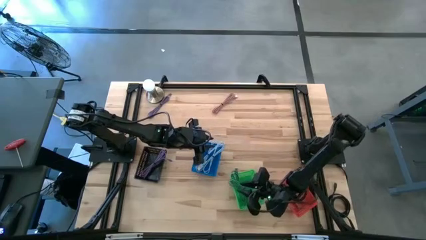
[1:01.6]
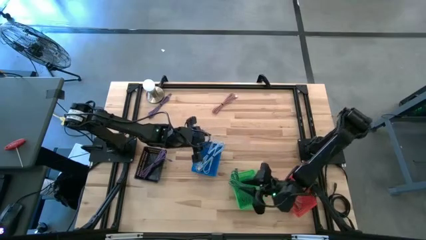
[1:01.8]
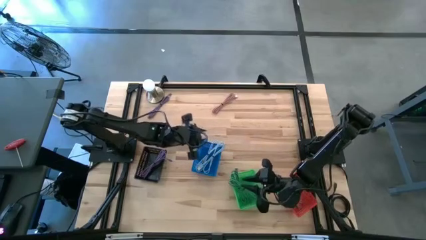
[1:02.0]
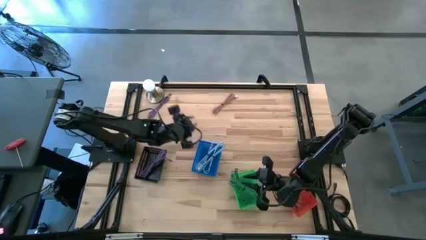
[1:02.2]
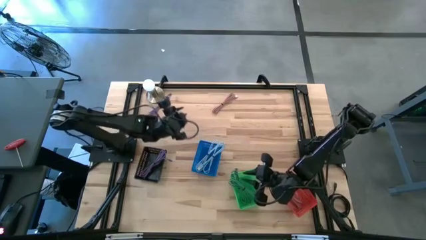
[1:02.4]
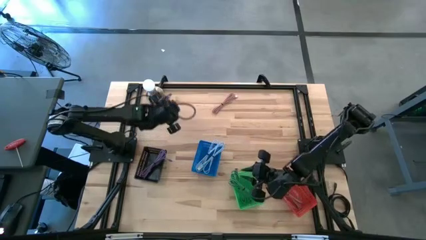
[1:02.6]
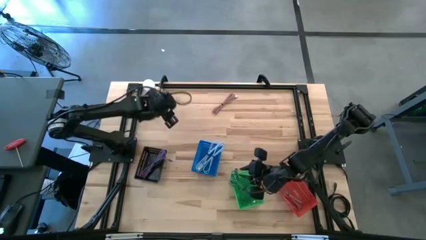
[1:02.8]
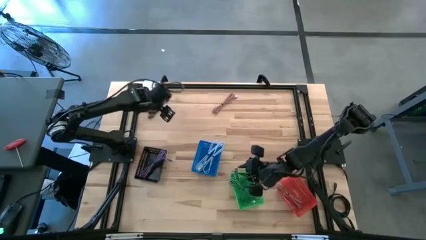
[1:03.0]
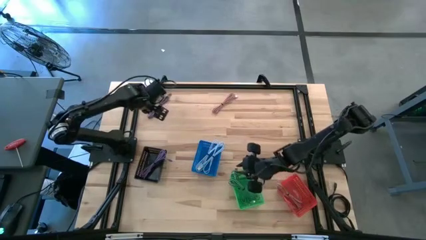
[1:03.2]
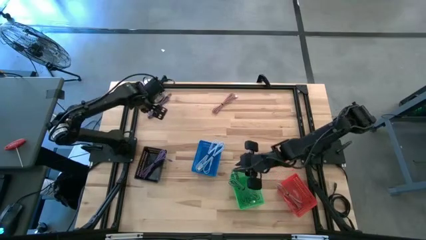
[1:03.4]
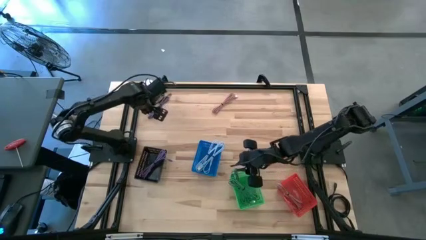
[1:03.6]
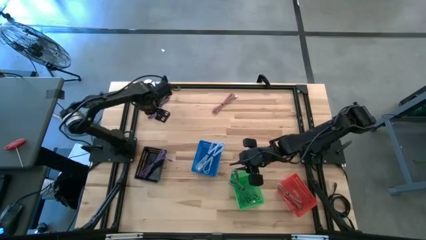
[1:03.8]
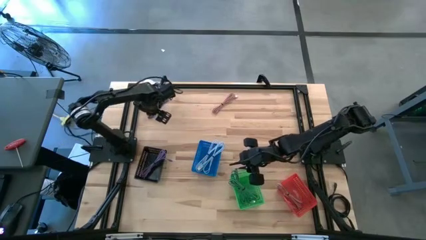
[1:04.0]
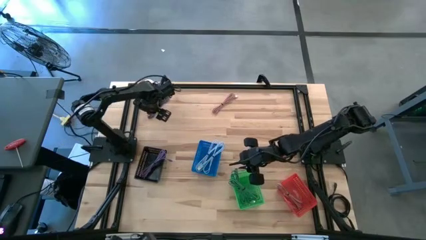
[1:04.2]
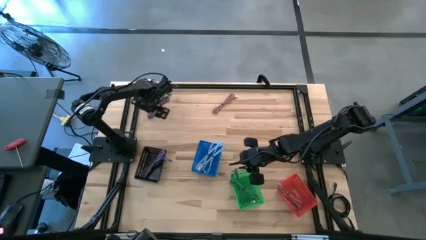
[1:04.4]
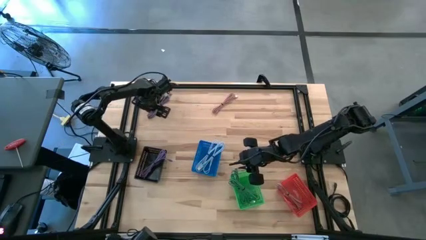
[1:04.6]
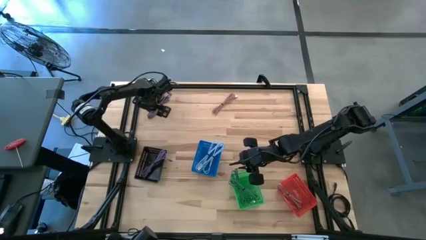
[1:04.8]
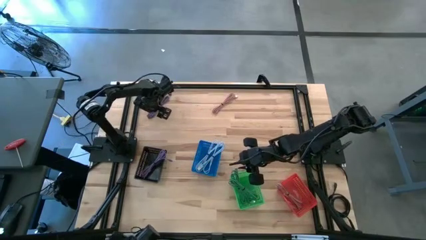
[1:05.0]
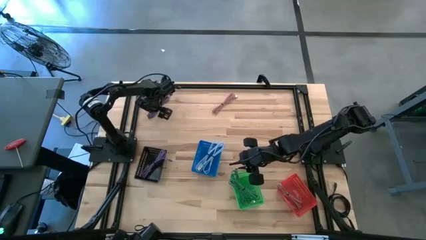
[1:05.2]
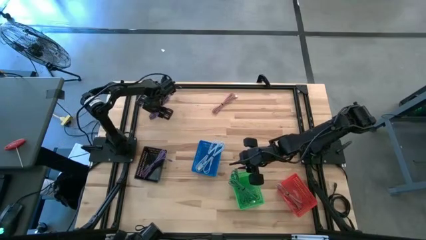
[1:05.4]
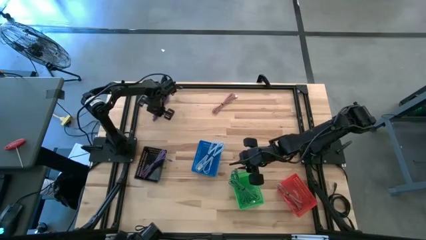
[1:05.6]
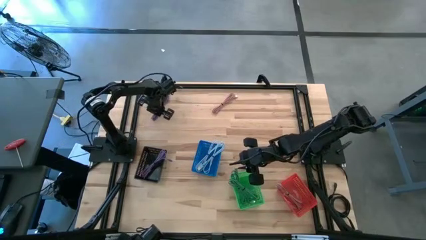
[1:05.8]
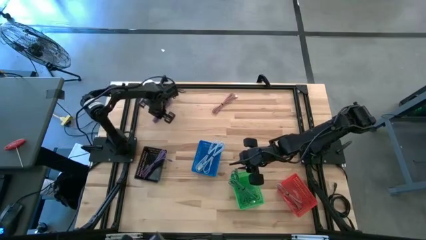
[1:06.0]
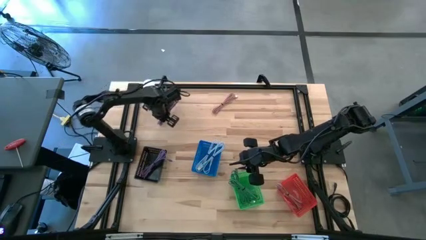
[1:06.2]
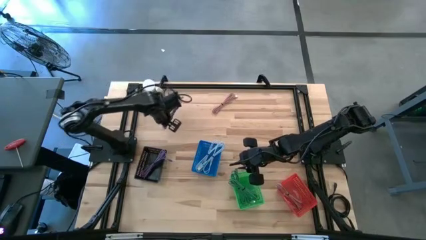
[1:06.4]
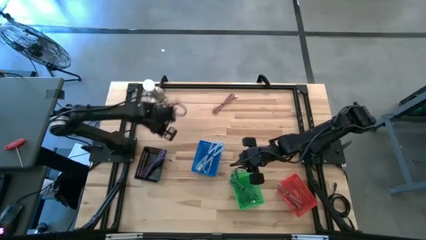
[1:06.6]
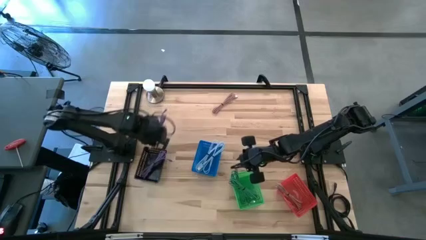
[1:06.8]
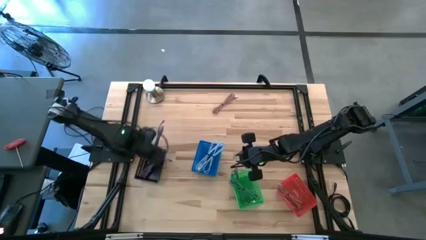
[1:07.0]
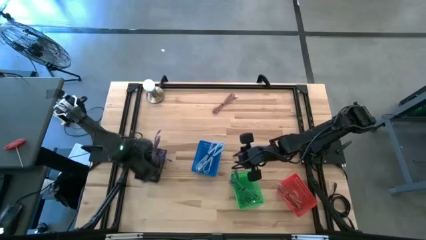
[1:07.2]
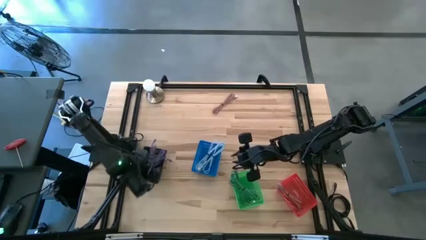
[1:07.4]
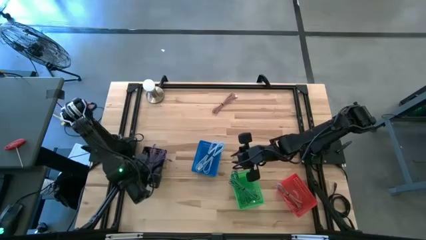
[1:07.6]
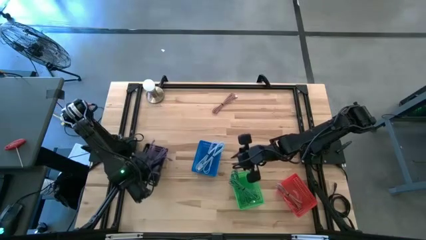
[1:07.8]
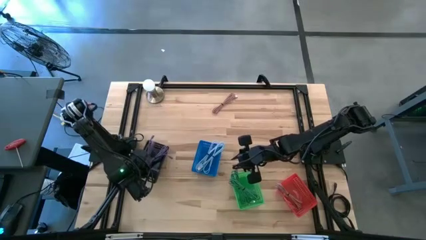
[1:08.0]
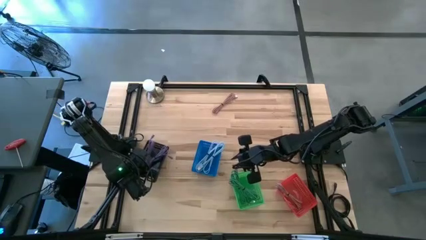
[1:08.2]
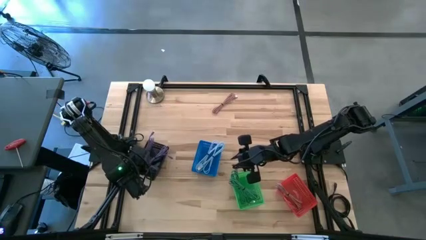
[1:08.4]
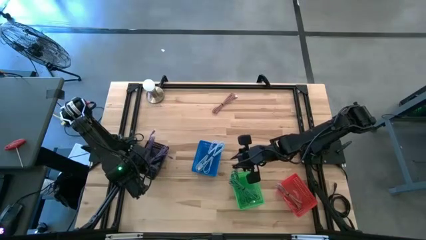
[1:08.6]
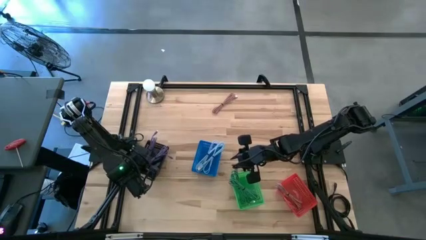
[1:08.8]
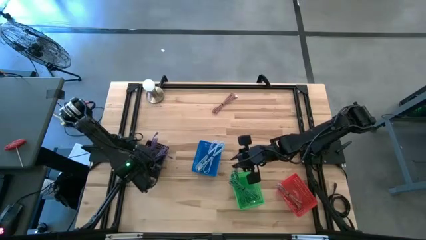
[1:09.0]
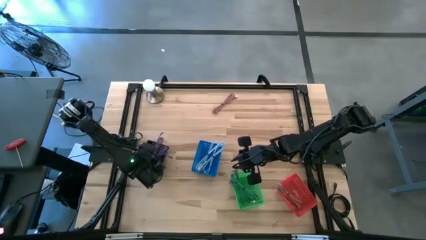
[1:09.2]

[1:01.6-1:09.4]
Task: Pick & Place USB Port
Put the blue USB cable into the black bin

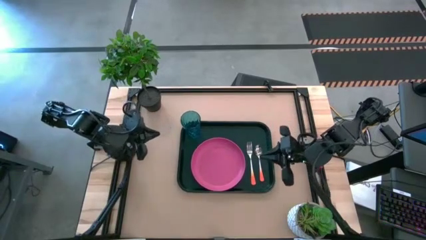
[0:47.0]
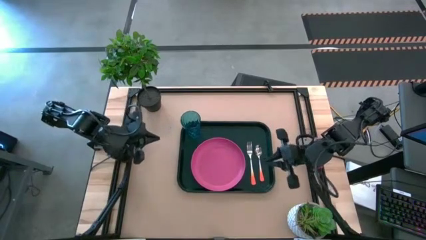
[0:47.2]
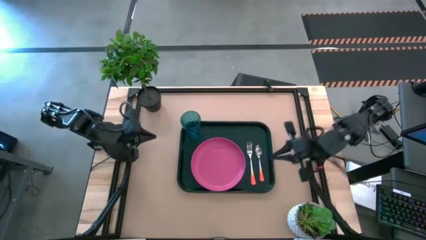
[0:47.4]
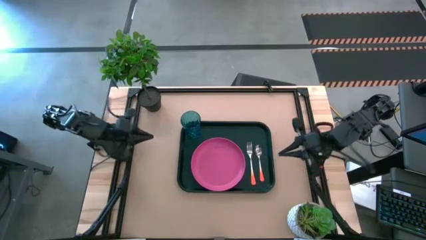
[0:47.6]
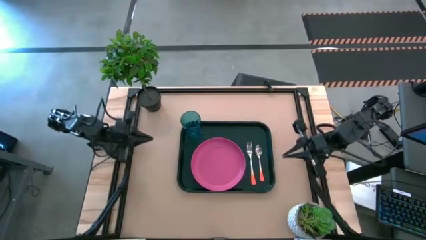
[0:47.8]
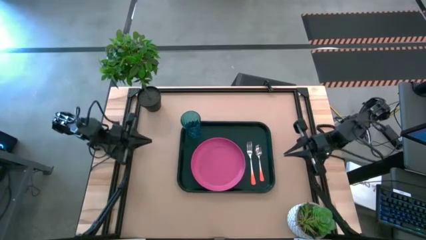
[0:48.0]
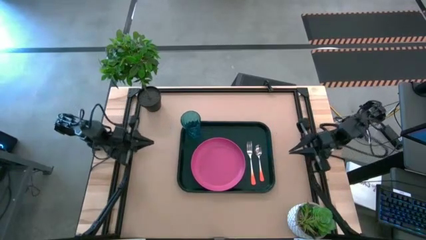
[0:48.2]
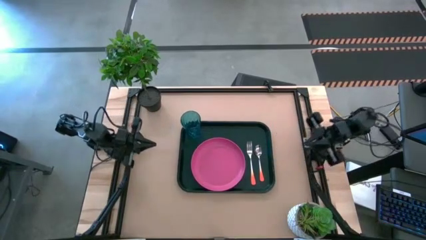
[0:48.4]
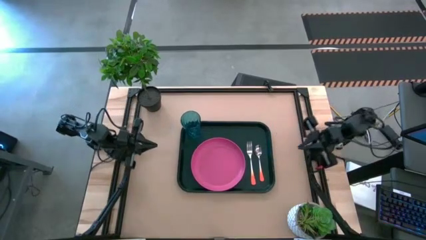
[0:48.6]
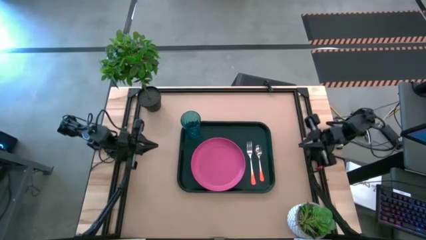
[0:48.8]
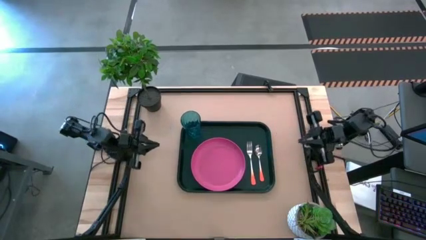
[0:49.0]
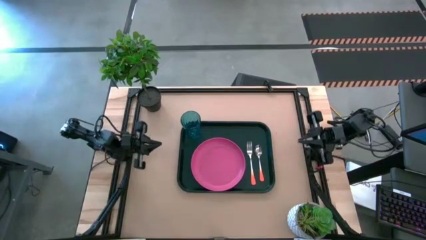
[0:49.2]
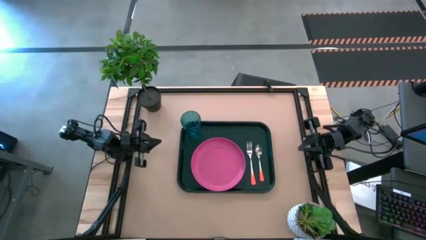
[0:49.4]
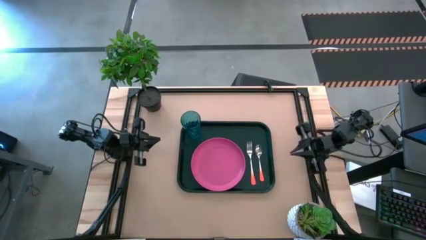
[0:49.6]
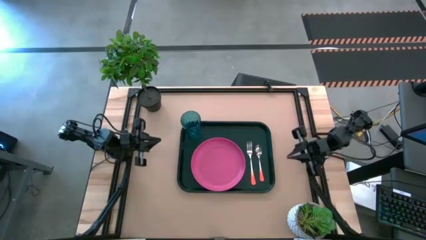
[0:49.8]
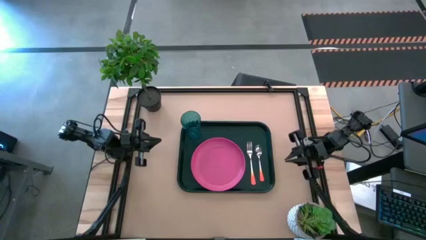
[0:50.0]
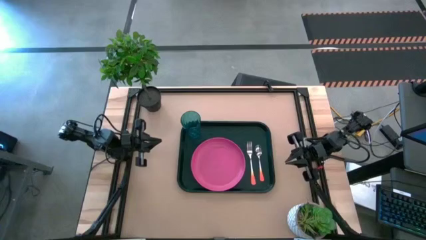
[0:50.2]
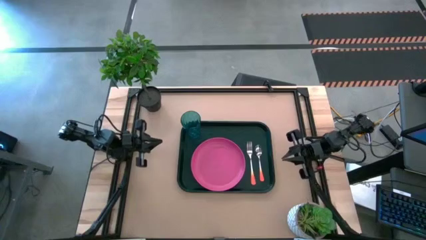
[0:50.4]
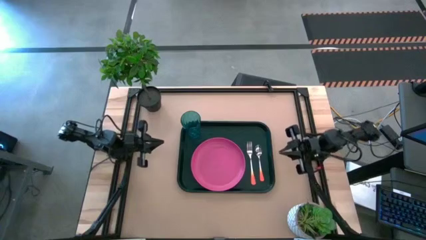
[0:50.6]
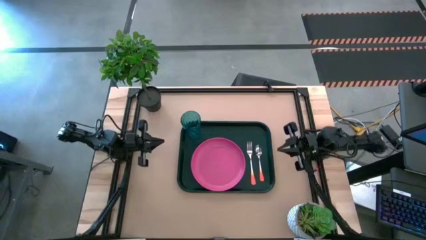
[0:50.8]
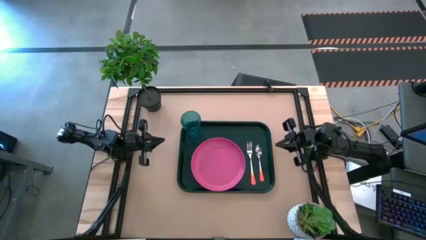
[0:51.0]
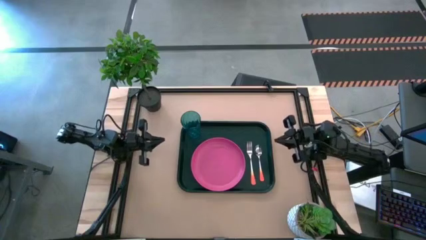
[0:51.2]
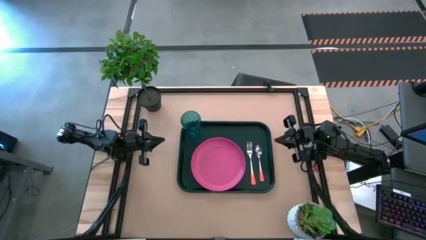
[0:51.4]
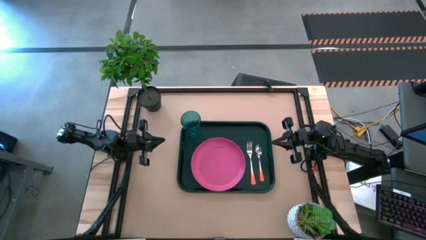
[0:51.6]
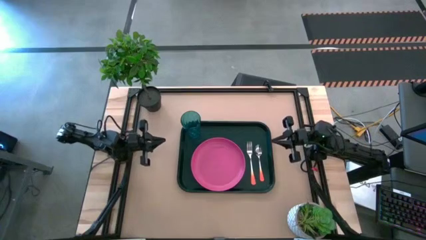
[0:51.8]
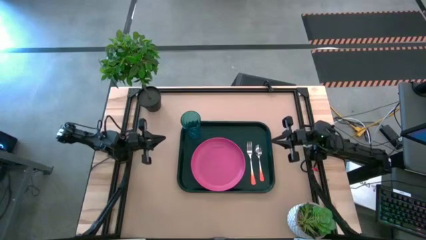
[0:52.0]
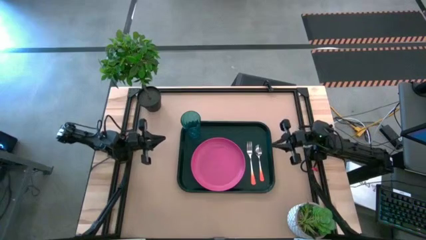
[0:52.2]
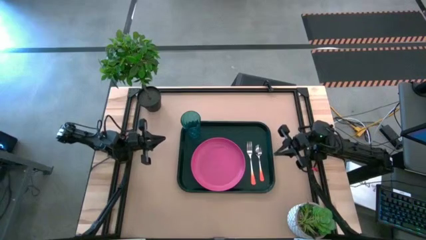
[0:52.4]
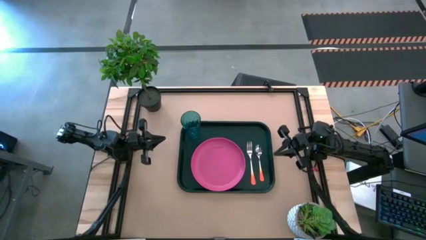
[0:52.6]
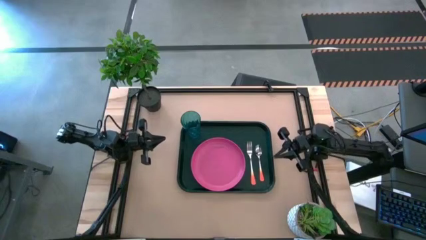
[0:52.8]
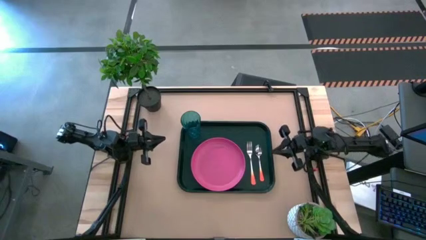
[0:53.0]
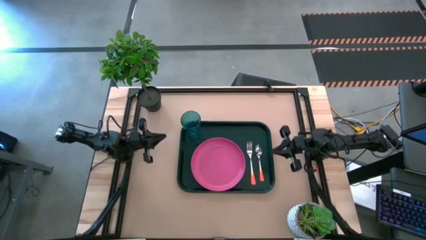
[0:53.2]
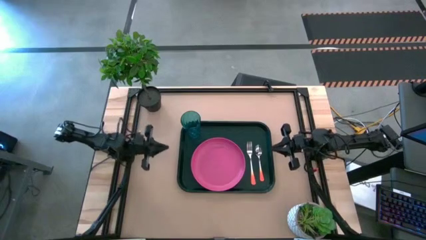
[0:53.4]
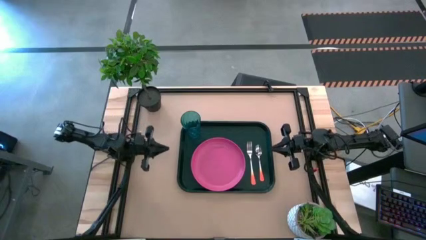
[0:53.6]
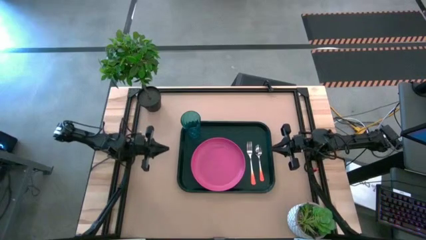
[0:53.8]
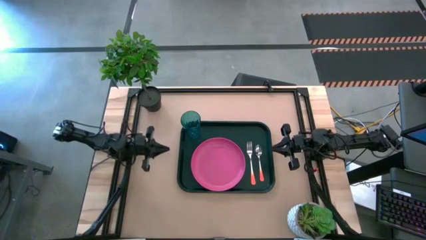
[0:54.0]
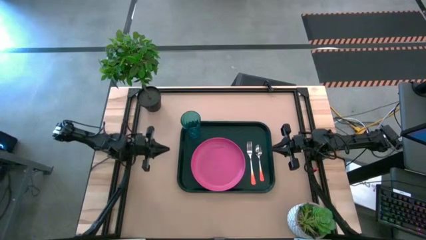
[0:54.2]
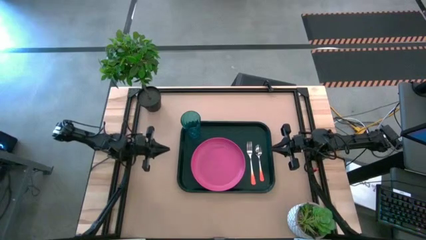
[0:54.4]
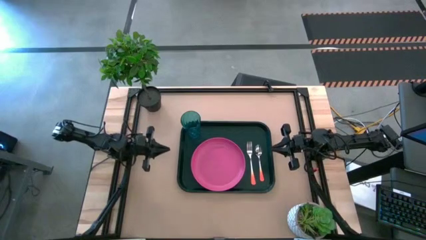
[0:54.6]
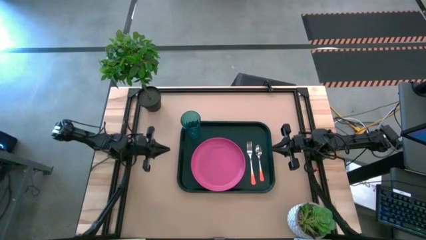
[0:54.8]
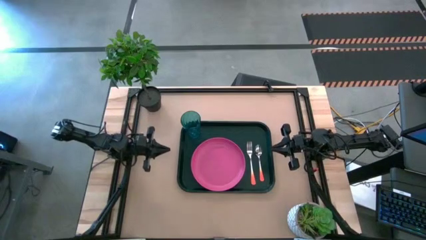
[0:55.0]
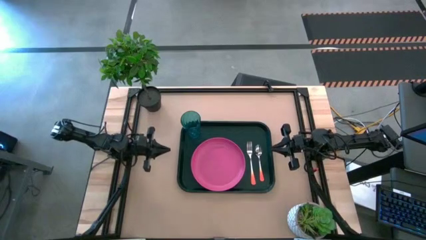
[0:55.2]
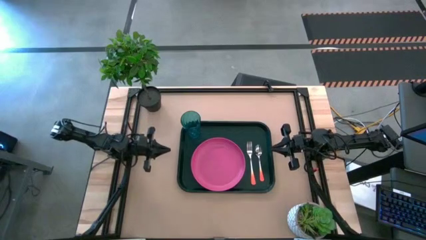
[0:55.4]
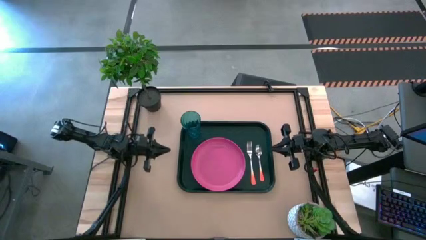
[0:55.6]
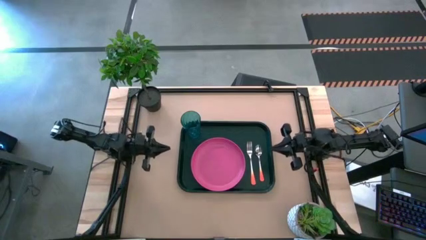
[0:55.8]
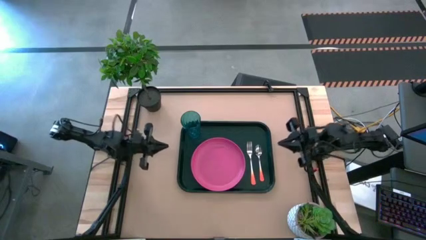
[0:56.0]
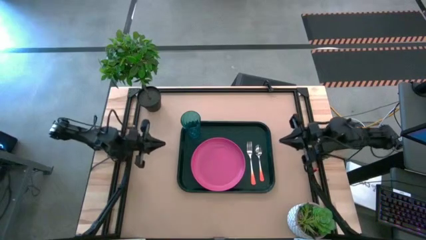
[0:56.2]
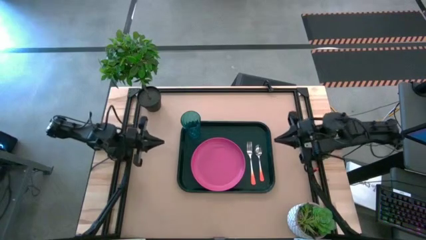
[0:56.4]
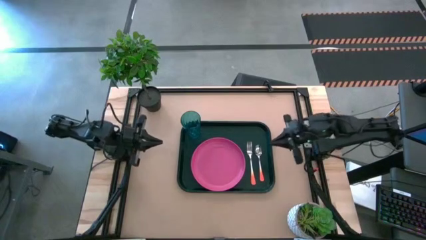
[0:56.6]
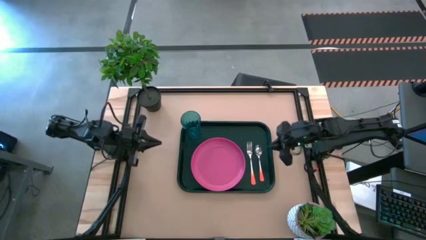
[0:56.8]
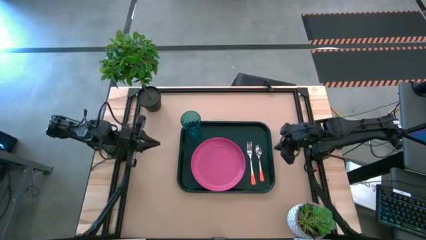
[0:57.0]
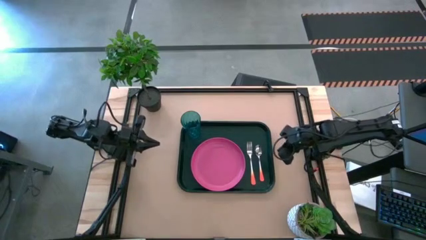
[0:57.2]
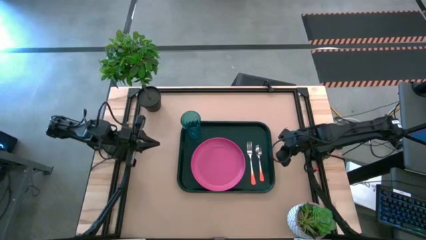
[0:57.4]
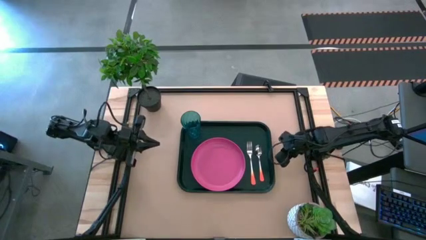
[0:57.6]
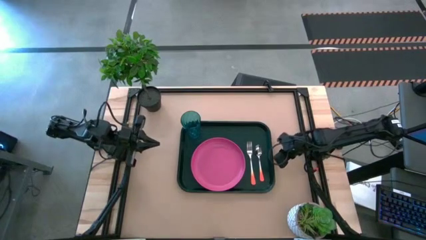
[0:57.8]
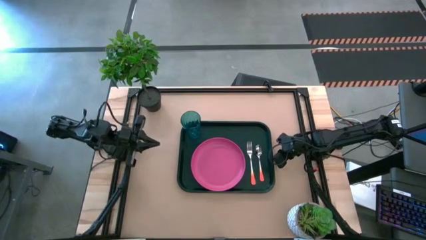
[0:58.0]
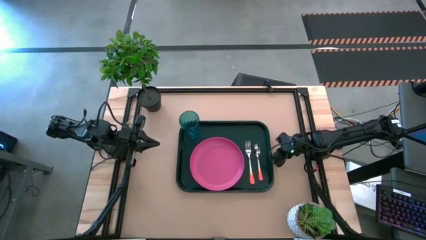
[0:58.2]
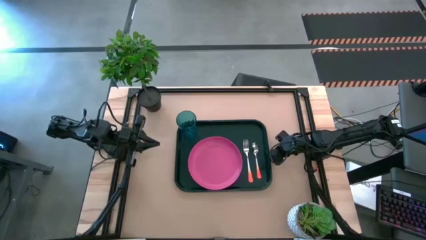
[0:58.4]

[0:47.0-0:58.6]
Task: Pick and place plate/cup/fork/spoon on tray
Move the green tray to the center of the table
